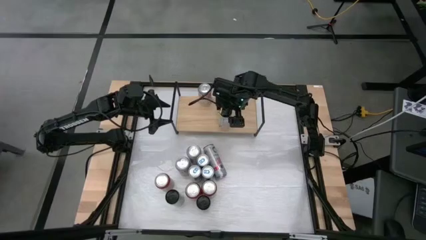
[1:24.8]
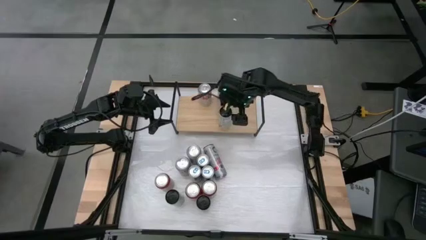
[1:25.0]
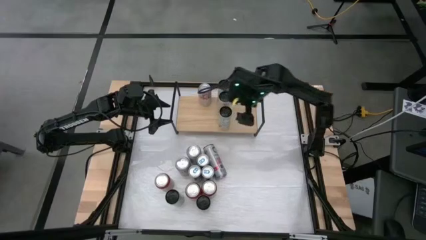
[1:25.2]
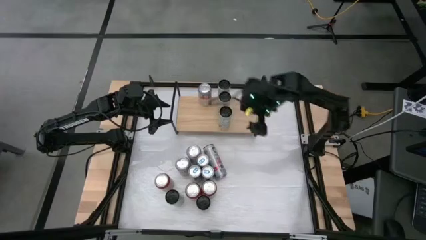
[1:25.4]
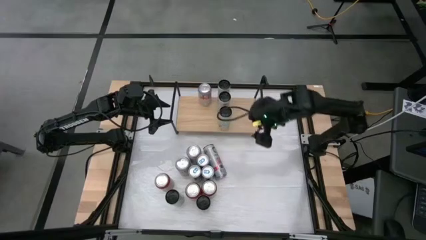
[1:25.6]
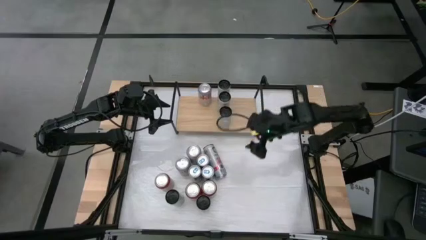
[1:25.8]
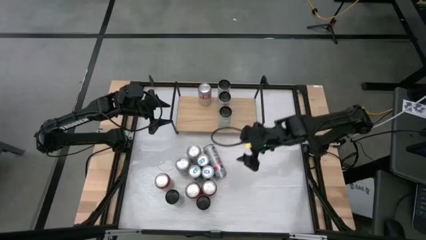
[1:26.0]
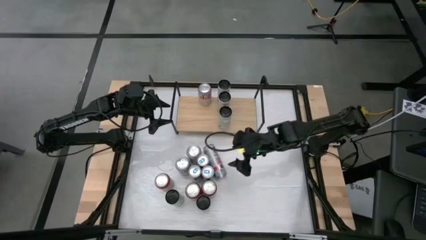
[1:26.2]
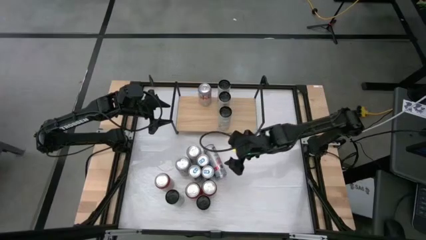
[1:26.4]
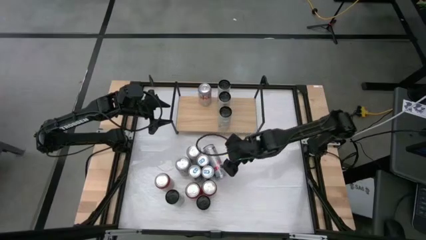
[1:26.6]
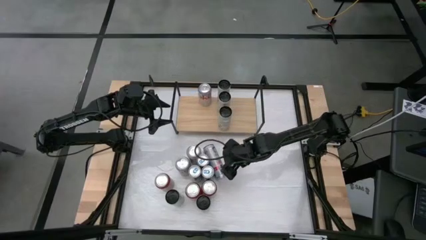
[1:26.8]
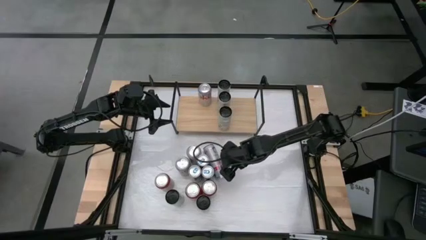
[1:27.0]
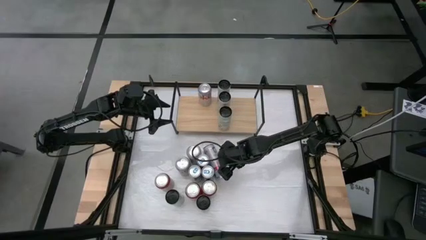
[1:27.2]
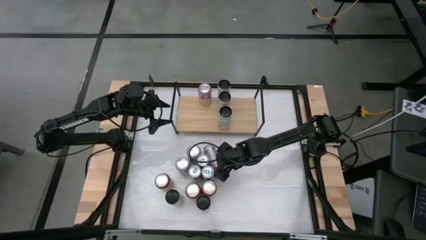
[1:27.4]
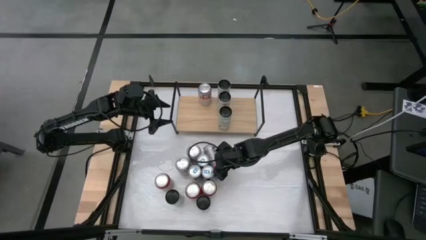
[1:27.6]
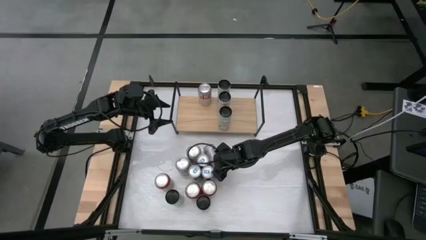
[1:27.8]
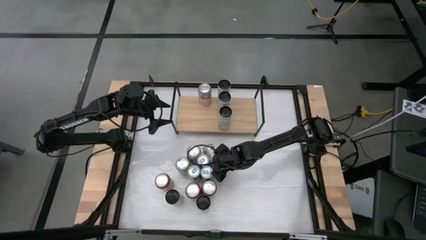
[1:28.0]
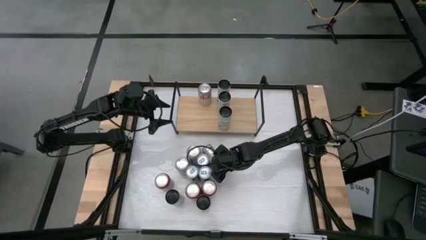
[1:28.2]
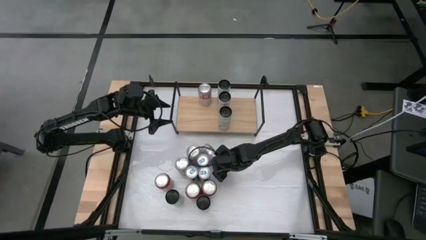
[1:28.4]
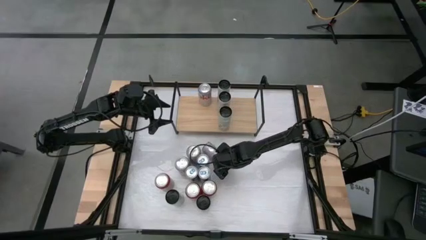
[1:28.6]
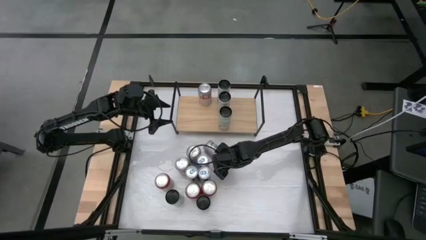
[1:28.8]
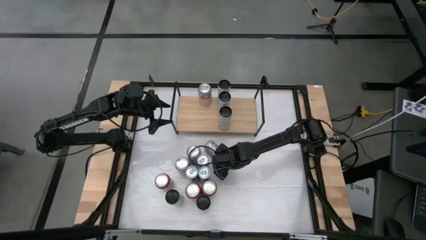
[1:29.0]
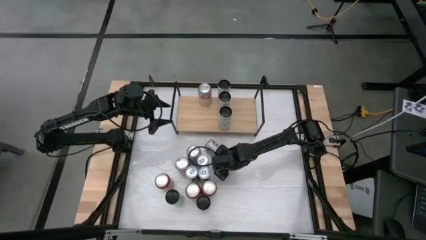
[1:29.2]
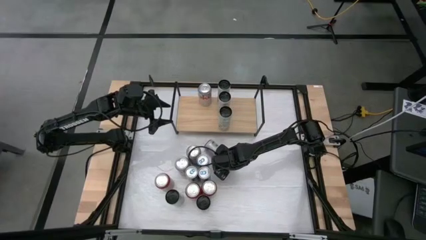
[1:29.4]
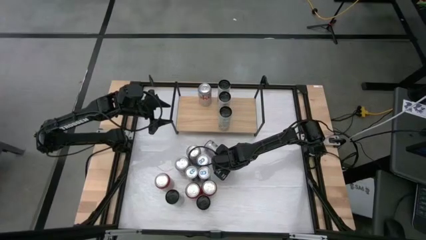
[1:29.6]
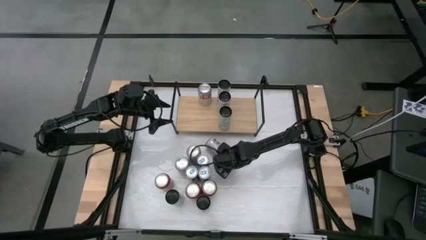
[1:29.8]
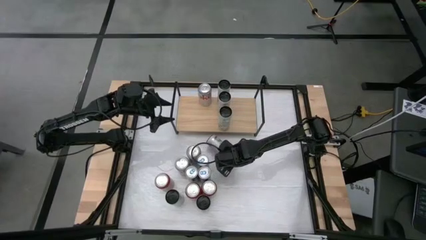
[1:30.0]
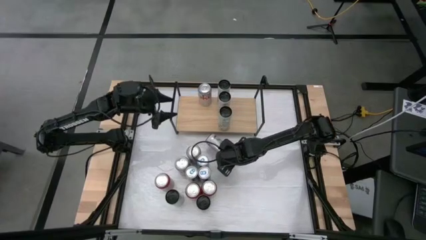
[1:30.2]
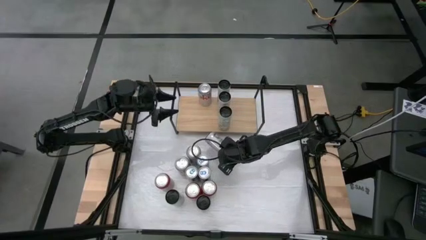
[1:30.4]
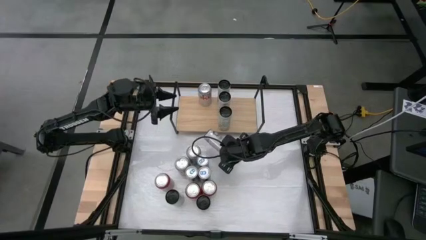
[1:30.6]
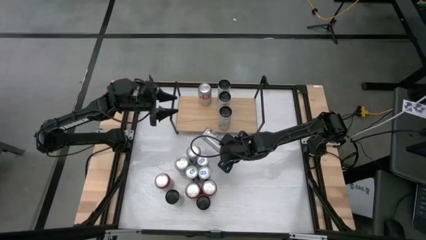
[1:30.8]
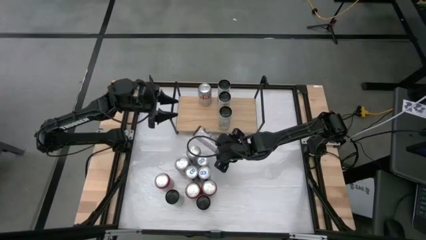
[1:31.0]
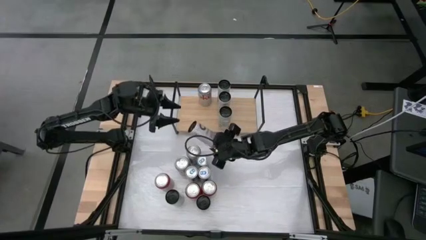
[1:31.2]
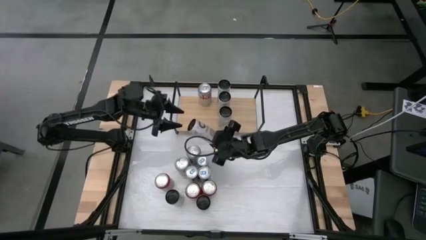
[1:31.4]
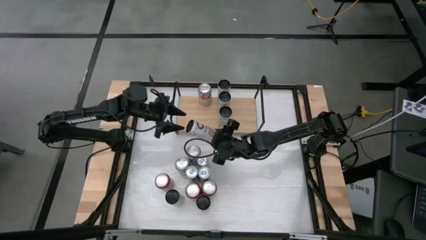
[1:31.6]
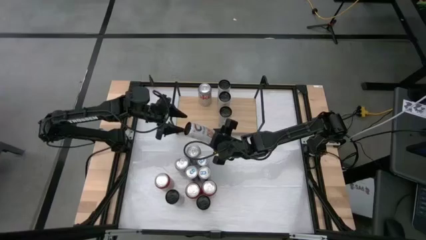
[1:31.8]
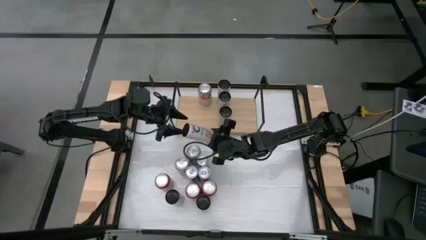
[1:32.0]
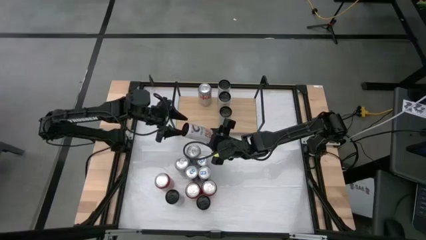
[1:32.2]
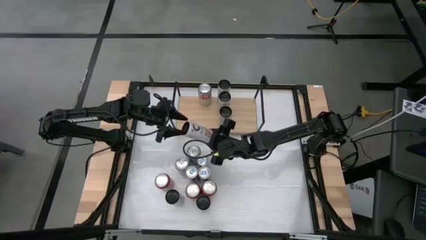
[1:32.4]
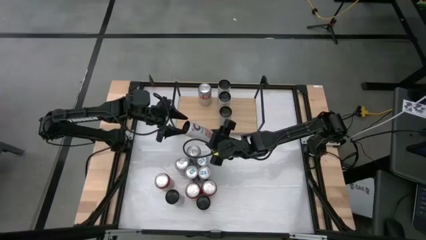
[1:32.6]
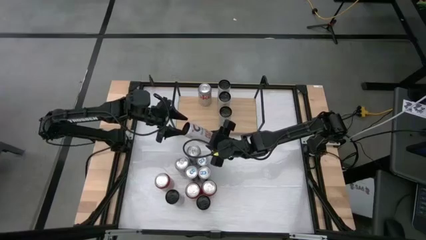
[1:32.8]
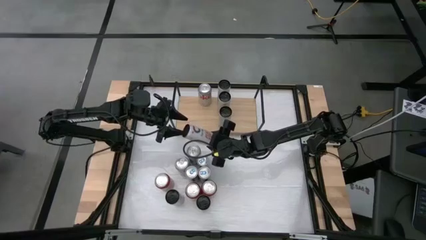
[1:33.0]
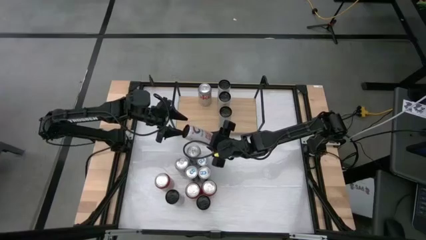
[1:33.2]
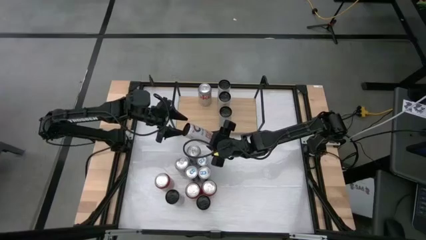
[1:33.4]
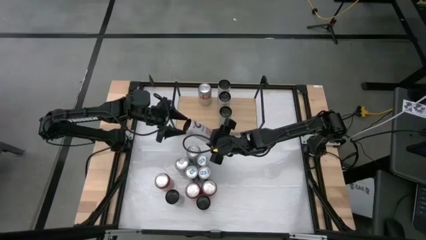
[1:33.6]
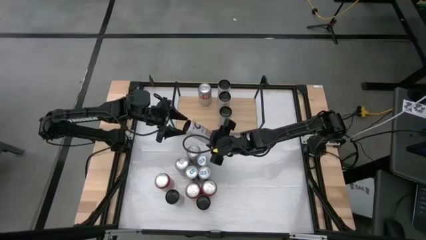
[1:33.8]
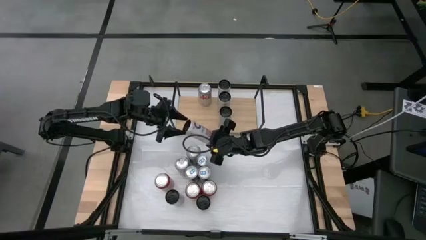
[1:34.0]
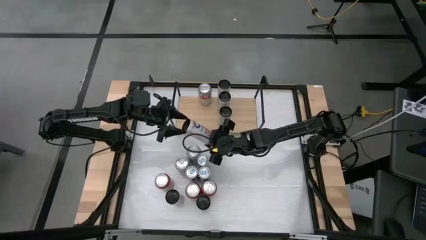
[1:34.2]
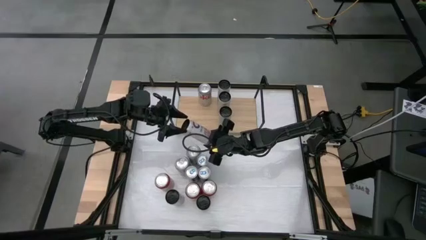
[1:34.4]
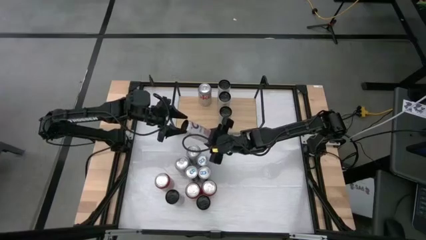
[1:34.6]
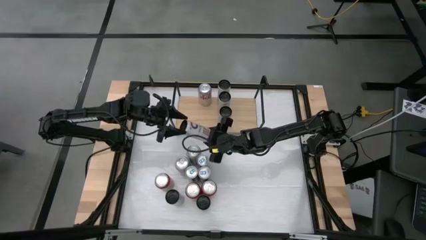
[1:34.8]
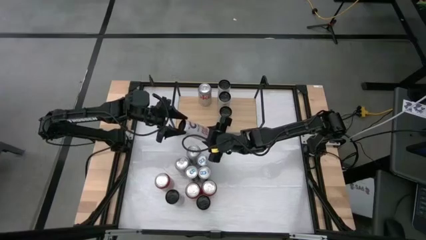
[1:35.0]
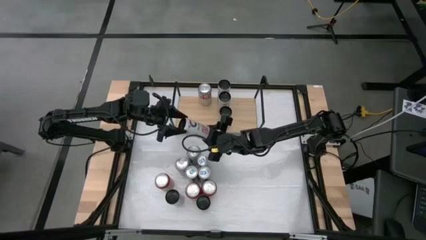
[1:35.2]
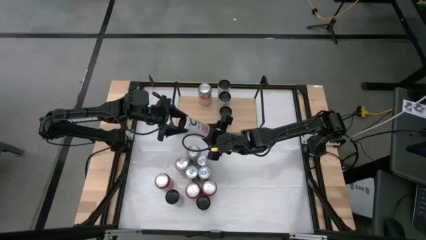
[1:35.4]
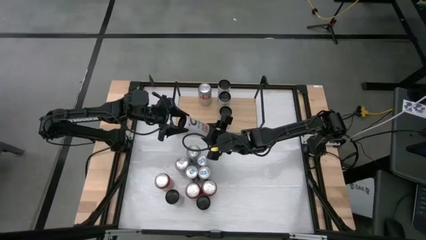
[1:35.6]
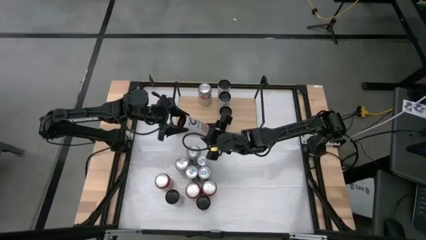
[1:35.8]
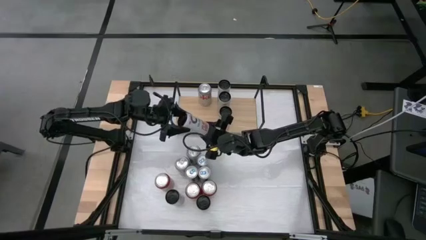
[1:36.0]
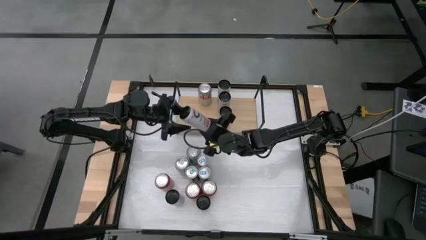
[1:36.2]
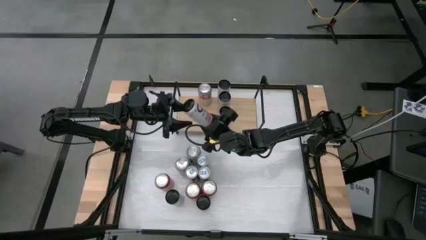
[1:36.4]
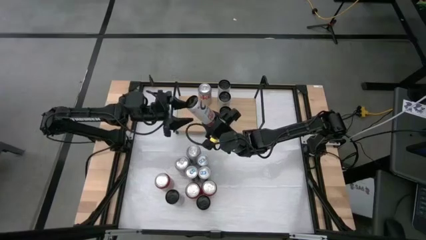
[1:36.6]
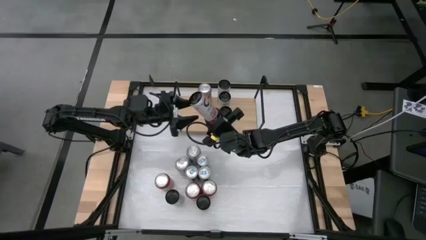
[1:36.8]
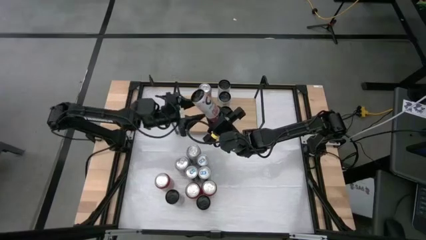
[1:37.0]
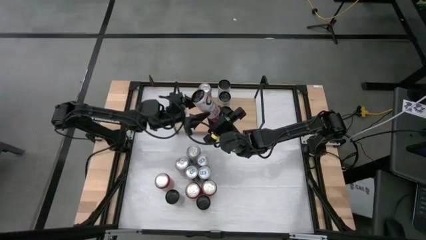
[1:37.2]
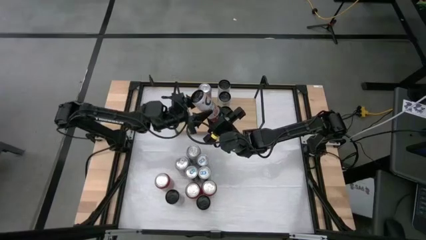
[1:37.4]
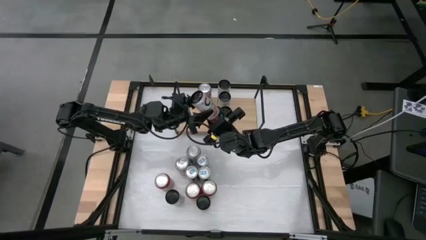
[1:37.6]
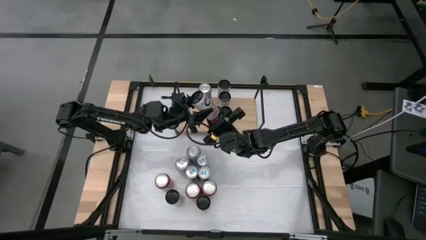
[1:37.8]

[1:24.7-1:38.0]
Task: Place canned beverage on shelf
Put the white pink soda can onto the shelf

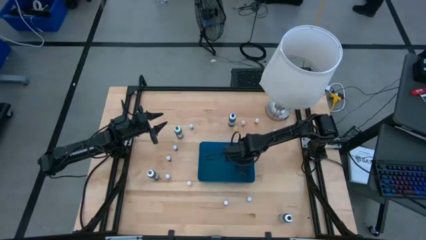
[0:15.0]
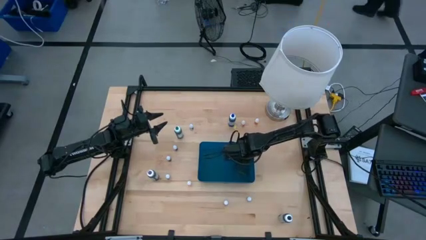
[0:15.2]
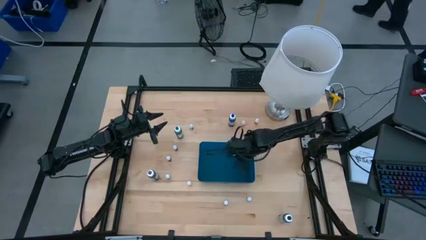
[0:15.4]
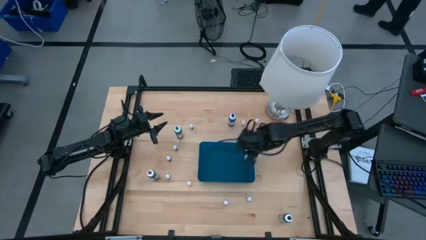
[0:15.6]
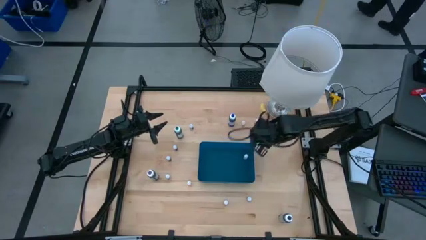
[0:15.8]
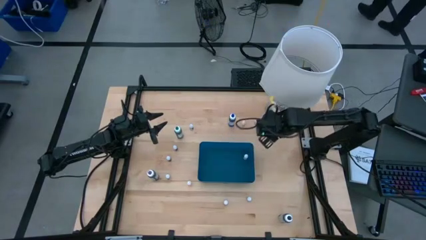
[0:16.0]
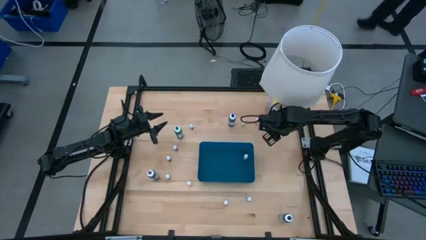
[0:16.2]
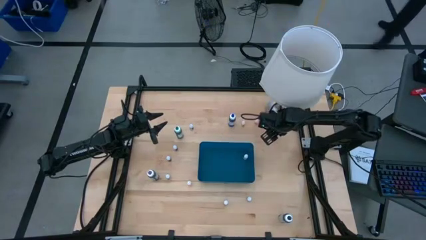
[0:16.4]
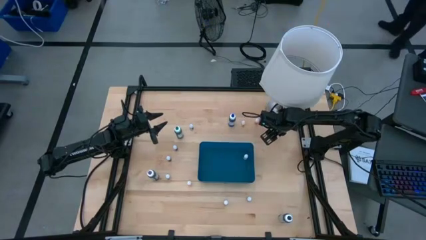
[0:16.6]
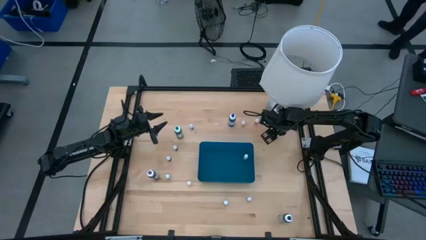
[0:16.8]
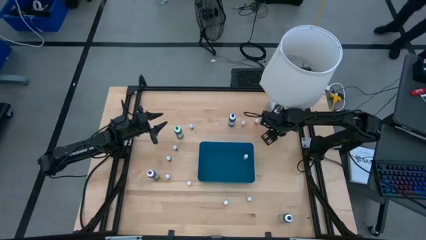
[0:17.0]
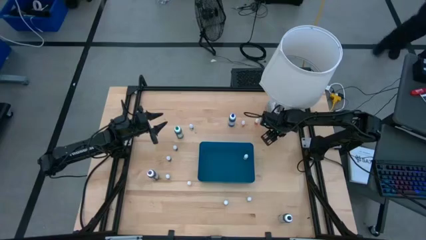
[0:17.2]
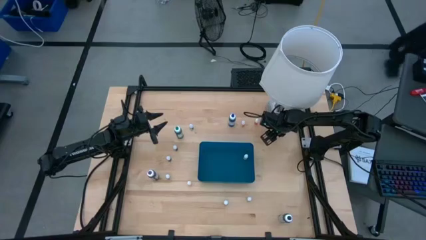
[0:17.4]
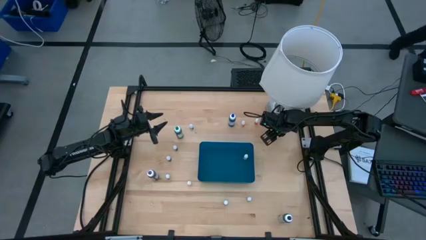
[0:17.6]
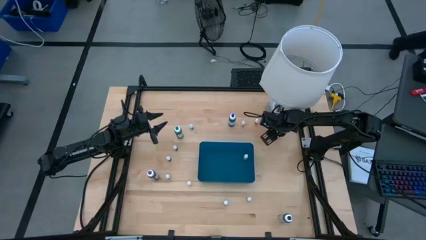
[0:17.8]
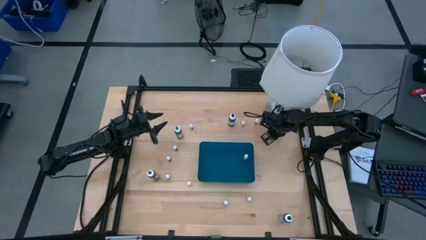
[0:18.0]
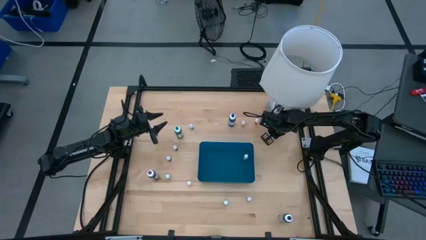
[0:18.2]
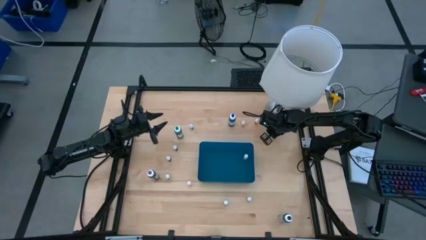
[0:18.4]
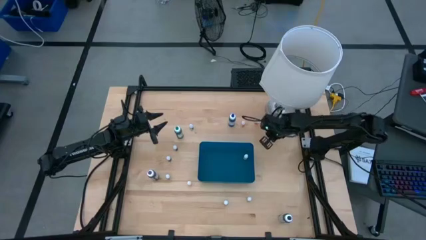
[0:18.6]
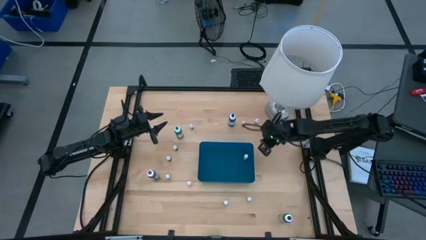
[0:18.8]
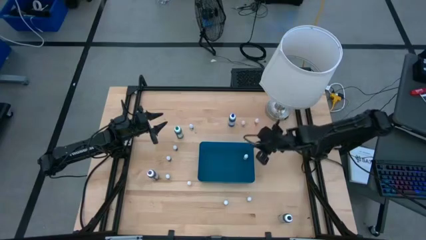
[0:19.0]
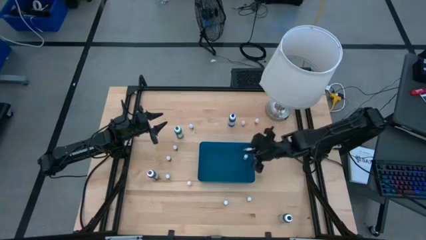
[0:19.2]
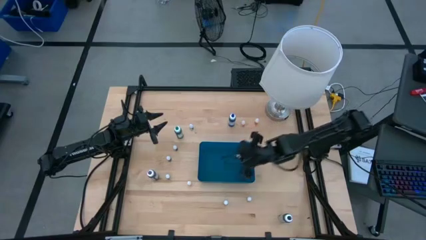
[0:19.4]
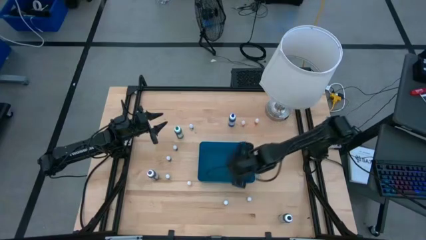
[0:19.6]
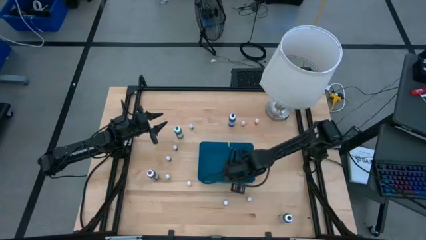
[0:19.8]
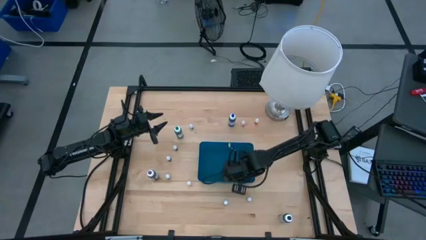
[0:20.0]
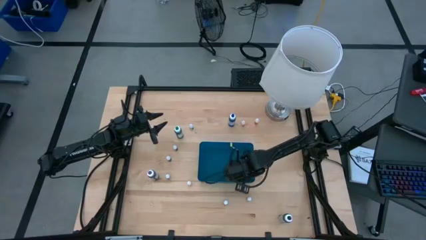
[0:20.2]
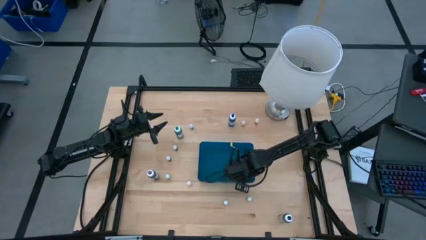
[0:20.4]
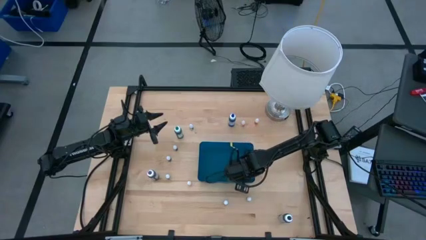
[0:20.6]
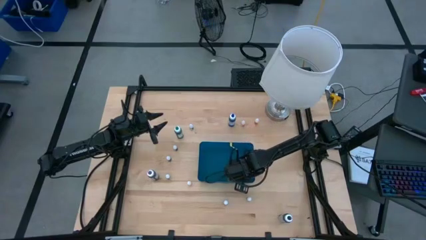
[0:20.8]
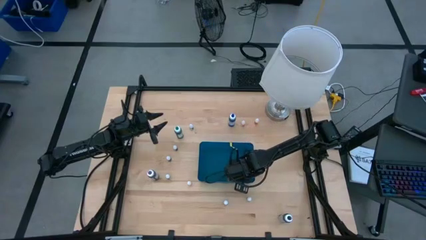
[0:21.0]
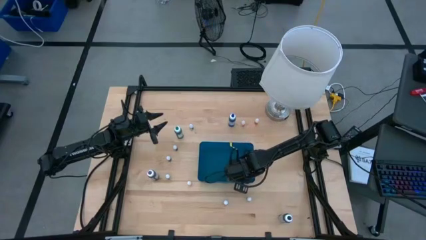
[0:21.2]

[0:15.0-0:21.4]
Task: Pick & Place food coloring
Put the small black food coloring bottle into the blue bin
